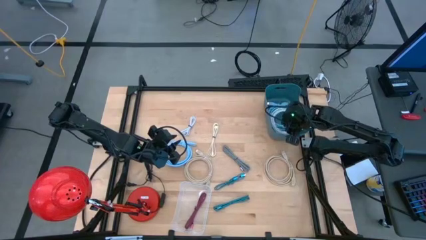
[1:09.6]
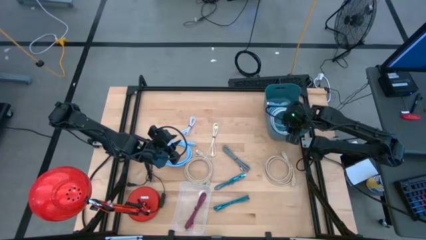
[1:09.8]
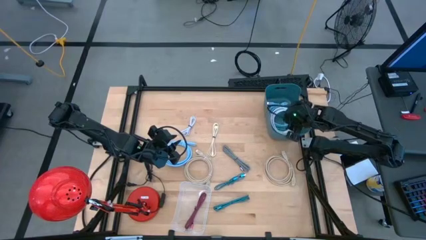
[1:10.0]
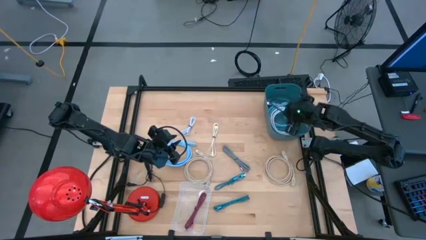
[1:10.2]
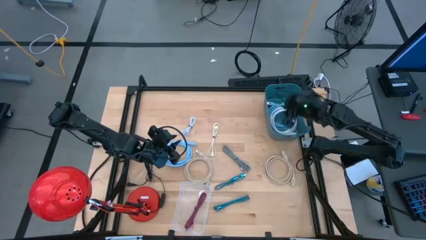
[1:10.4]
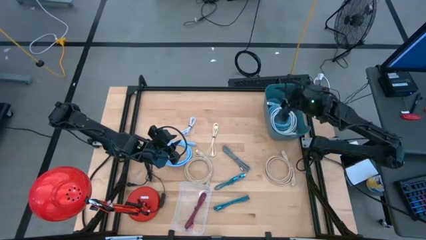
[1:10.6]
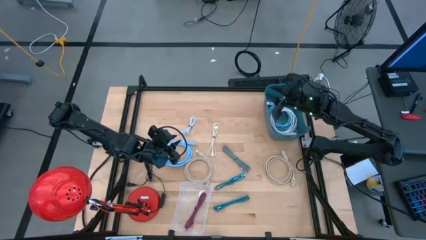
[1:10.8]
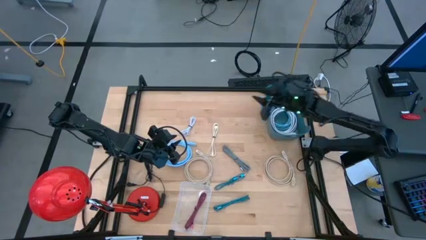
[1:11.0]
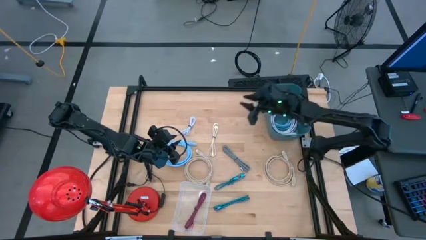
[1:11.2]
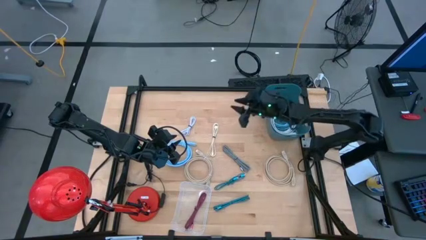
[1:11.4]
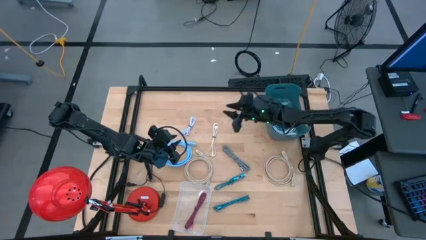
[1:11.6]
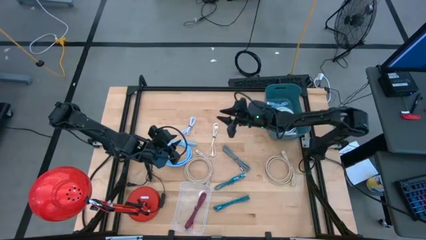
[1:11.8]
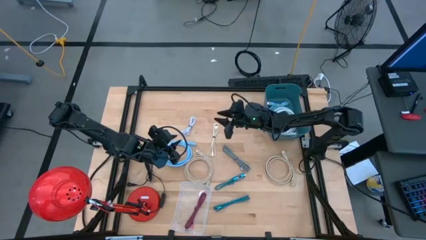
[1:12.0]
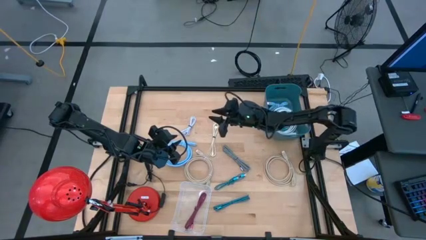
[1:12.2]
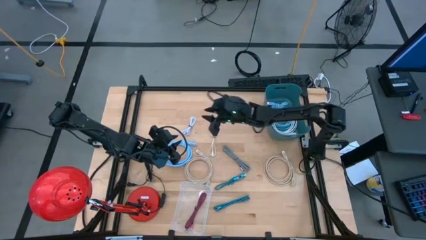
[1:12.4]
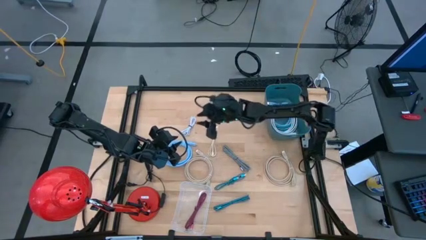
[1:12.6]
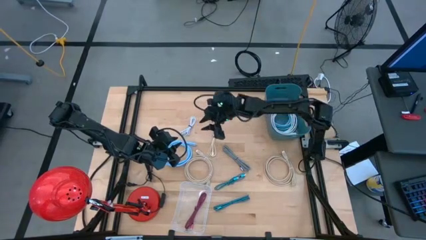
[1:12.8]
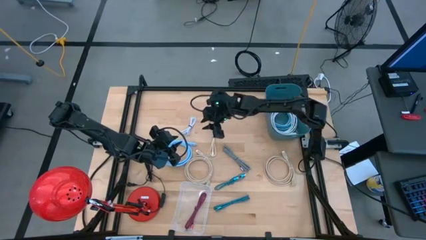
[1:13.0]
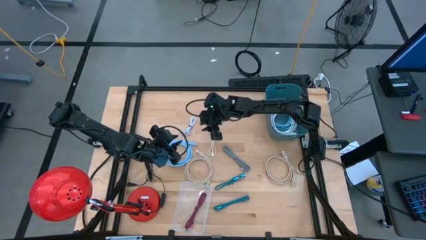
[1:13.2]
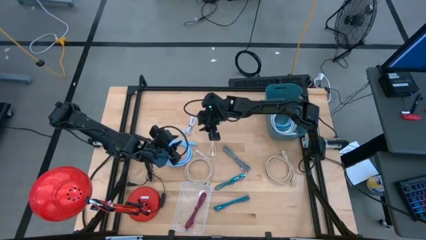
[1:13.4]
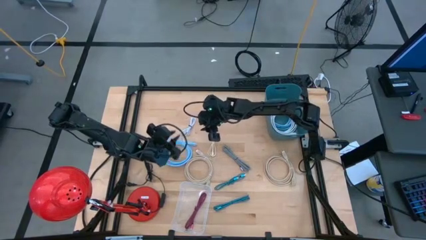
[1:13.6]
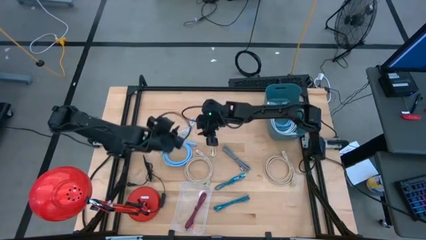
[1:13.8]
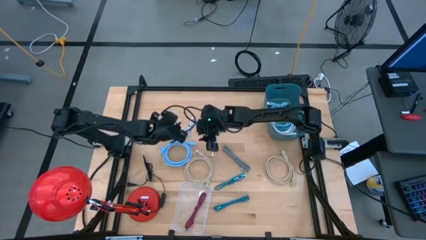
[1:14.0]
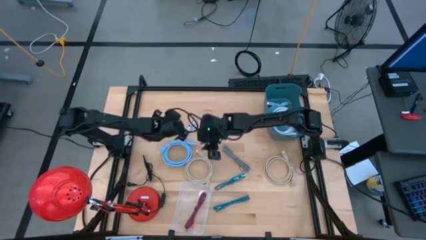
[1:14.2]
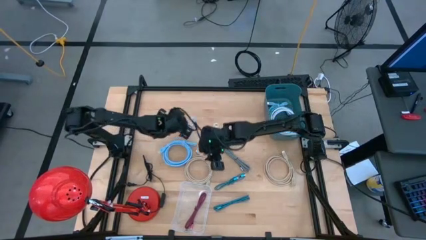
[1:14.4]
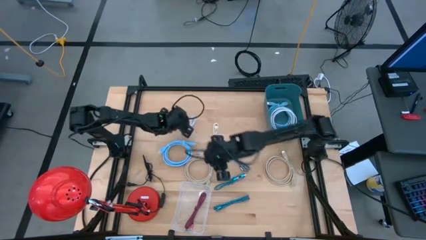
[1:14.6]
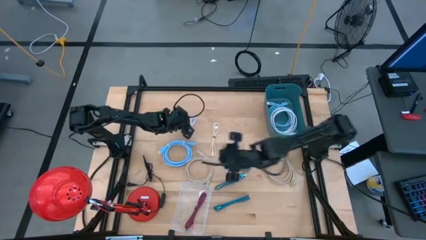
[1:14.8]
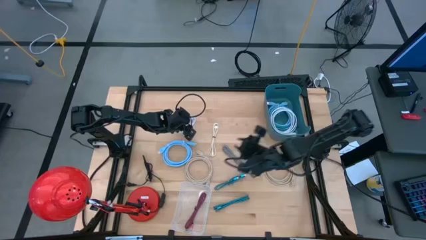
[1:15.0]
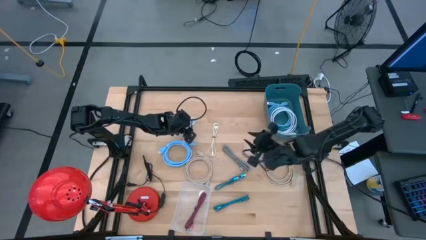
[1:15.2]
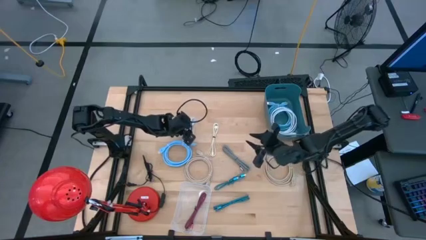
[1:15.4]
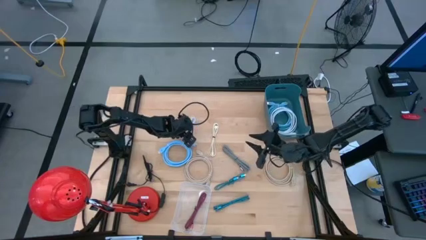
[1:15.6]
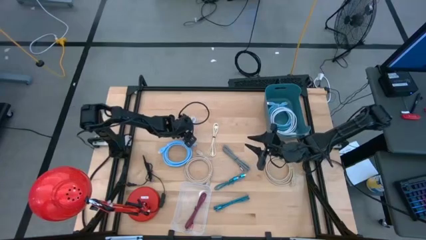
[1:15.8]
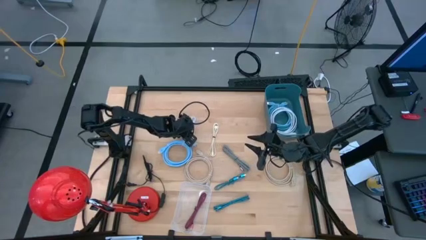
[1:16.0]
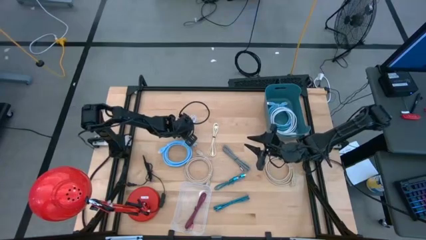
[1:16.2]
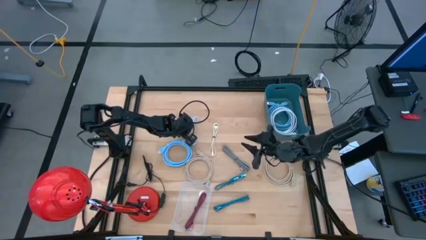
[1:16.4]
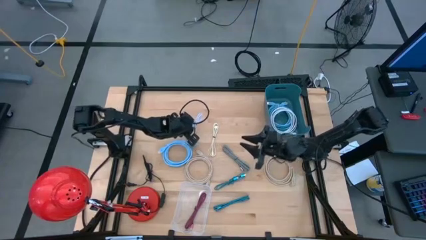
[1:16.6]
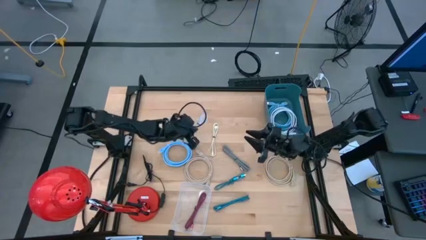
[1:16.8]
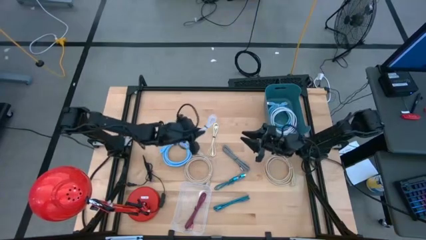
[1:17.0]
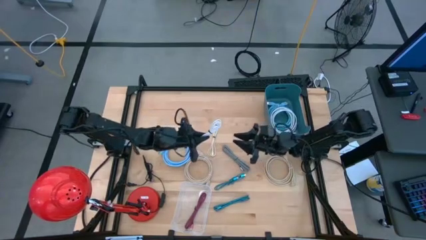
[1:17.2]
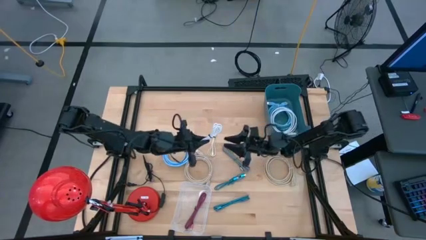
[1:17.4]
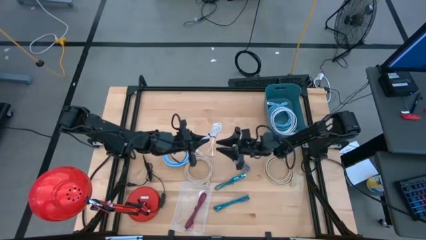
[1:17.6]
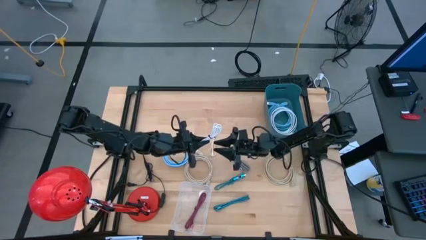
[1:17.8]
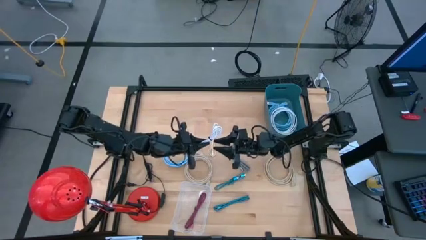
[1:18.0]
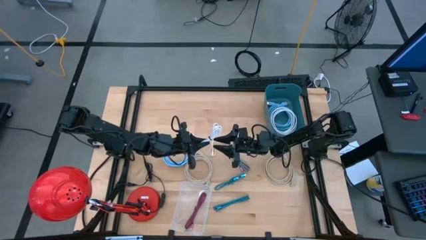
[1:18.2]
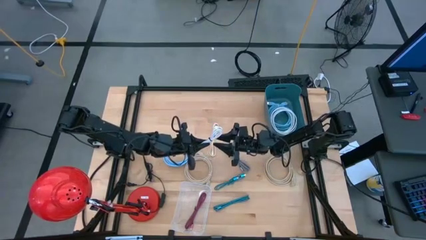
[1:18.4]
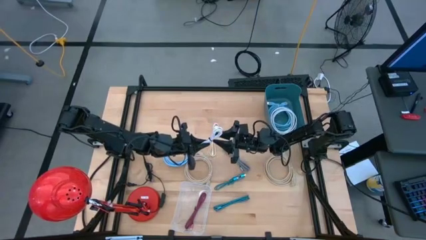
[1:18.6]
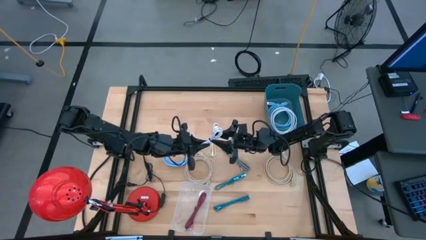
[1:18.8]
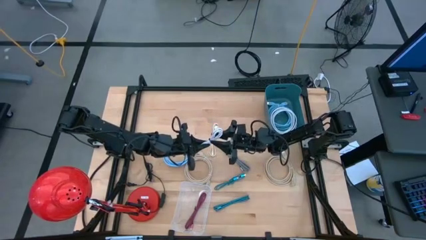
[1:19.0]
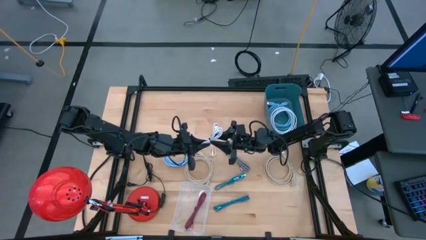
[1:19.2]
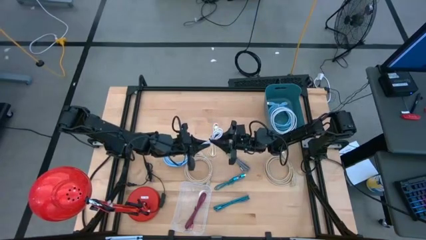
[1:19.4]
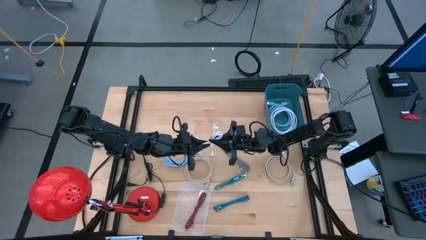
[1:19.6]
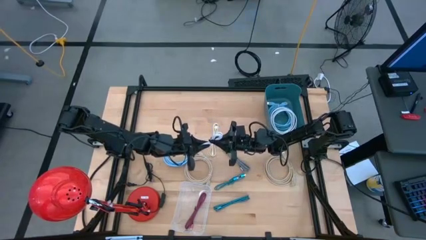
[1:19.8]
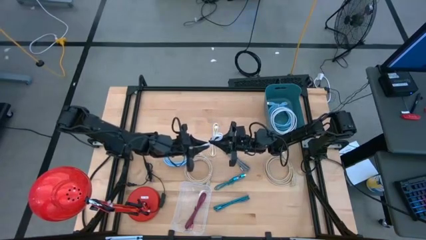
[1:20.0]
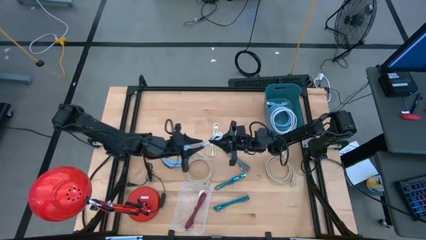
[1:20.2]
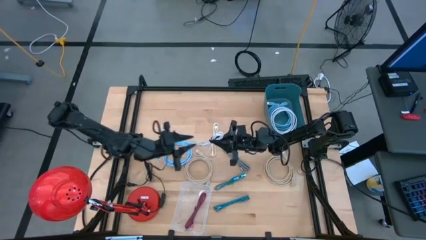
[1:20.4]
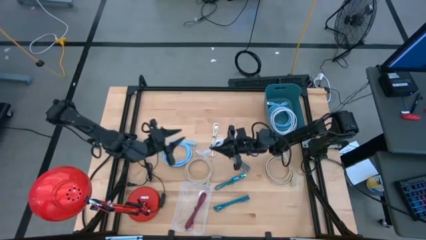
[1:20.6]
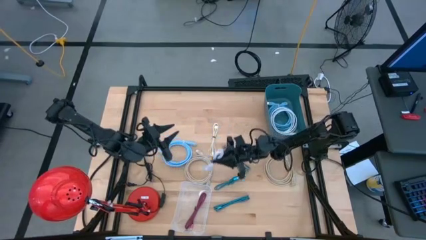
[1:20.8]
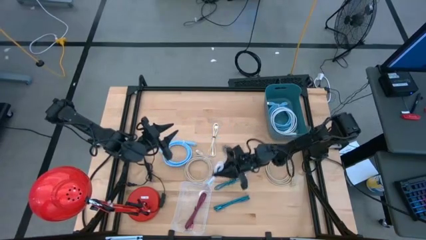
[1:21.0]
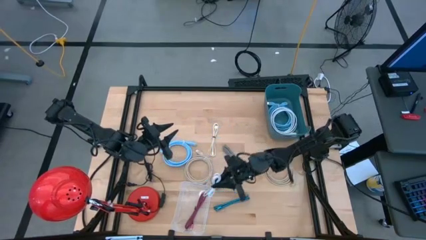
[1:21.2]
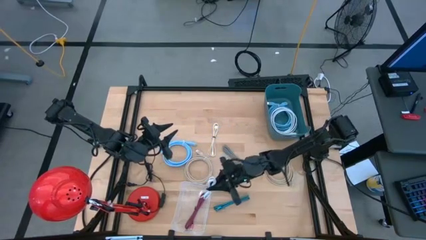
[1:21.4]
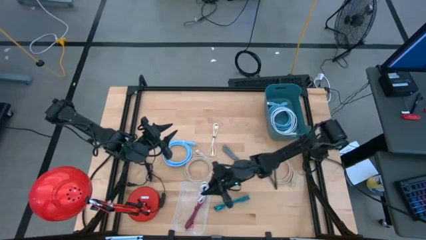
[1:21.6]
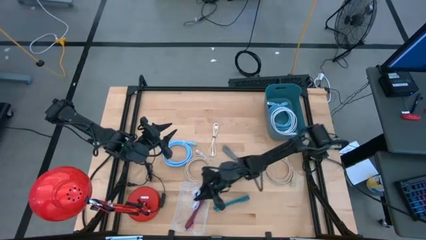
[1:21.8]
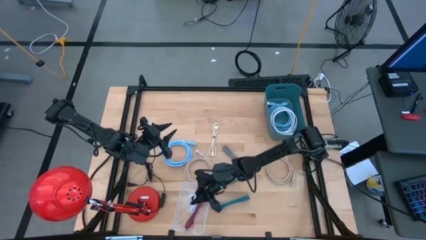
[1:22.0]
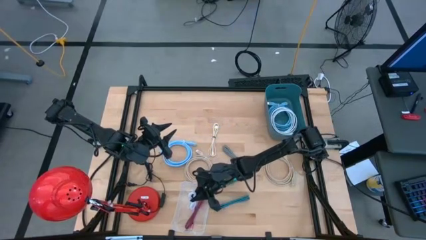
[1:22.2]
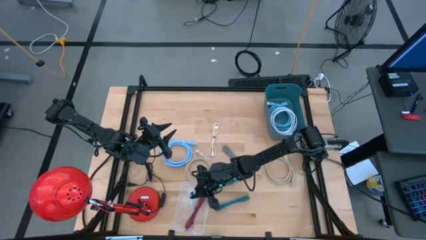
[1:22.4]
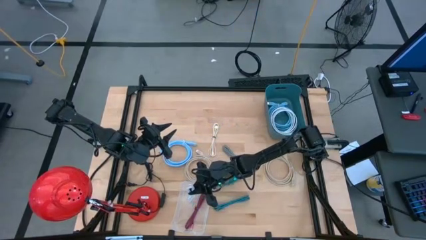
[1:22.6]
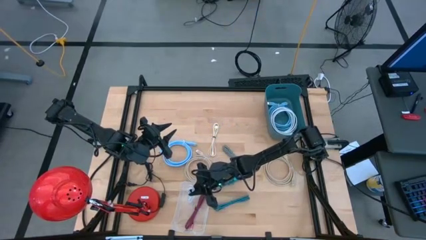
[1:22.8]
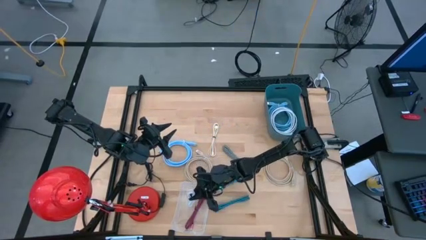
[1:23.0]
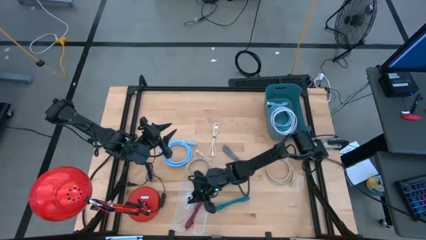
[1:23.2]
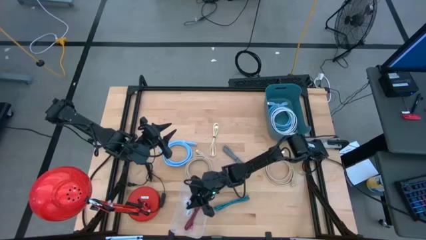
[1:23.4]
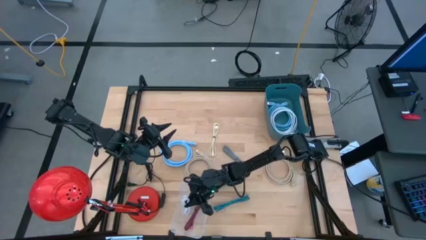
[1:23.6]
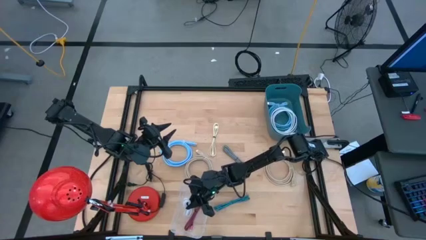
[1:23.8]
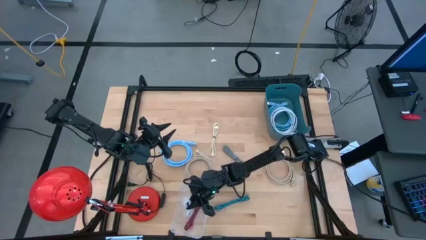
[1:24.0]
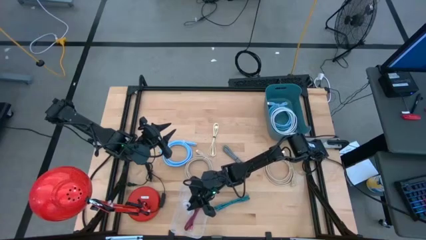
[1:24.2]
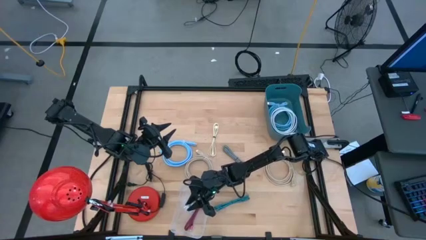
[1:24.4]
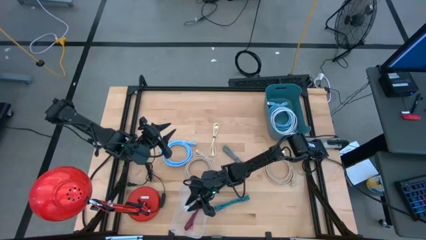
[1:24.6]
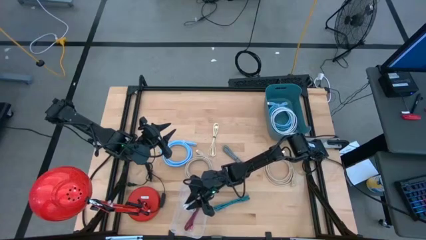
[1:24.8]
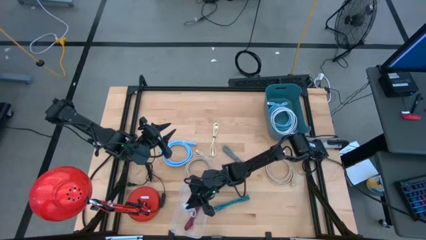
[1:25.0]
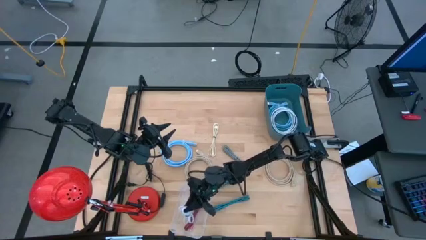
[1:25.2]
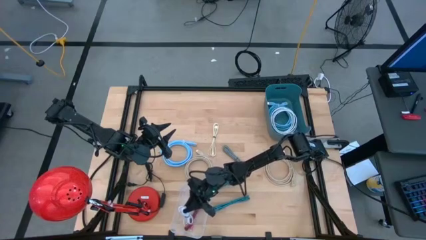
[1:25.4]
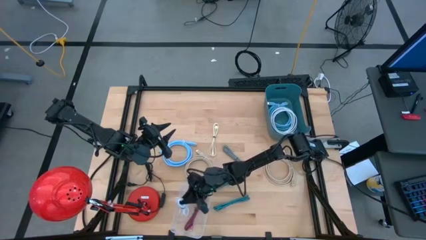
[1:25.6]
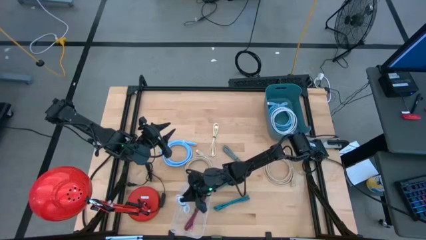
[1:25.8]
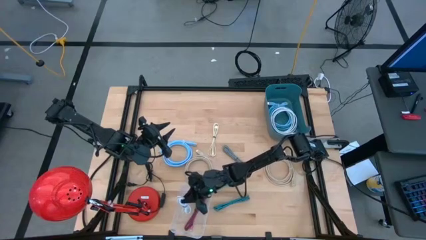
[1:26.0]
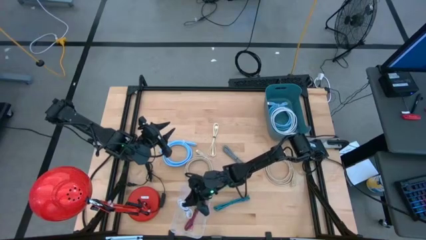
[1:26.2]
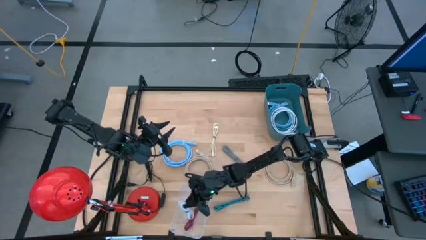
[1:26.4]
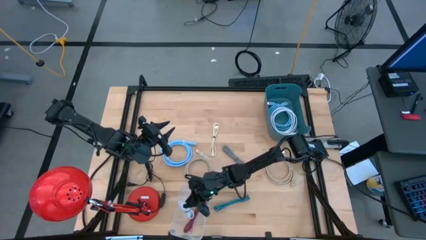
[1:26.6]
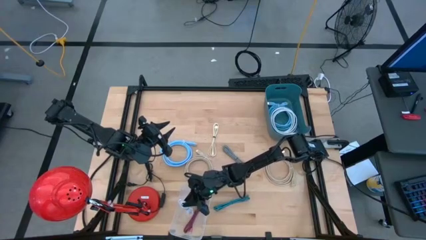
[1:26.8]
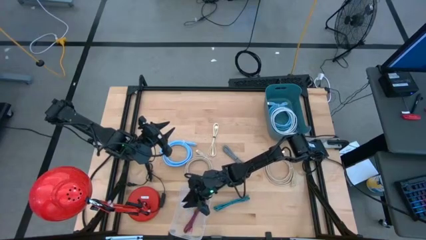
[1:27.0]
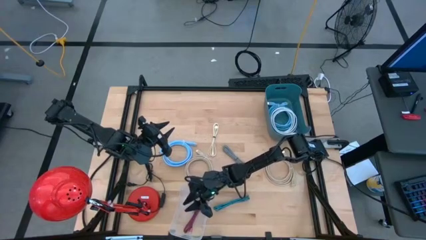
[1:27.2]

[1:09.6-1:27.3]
Task: Pick & Place USB Port
Put the left white charger cable into the transparent cable
